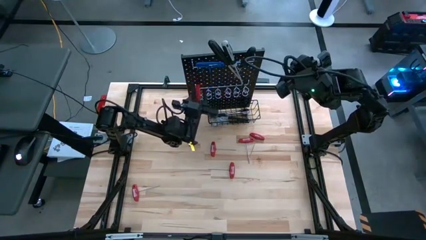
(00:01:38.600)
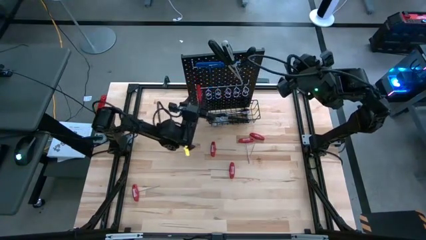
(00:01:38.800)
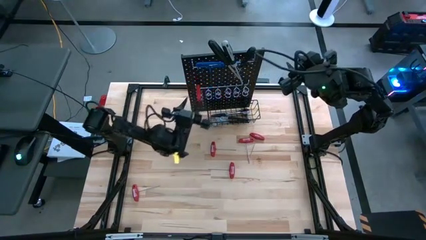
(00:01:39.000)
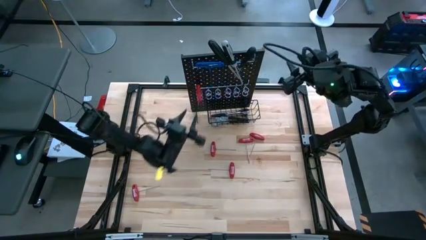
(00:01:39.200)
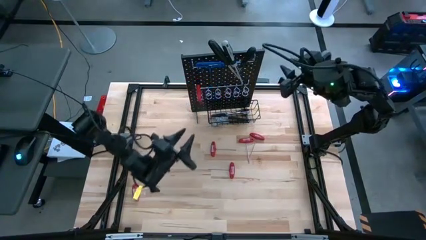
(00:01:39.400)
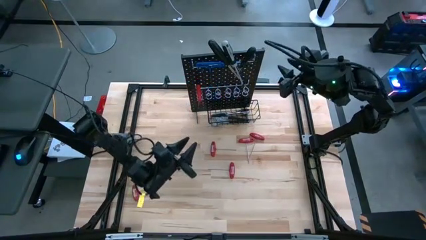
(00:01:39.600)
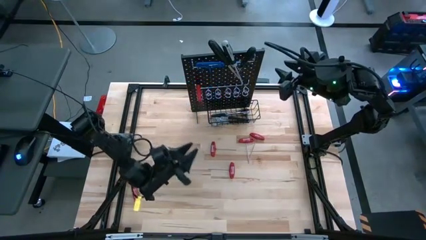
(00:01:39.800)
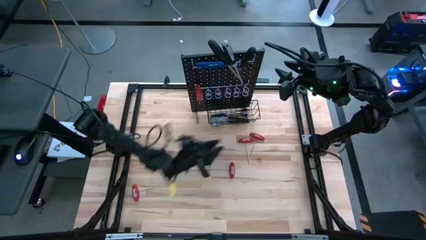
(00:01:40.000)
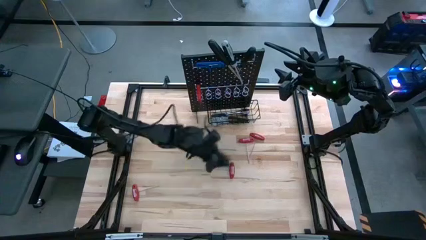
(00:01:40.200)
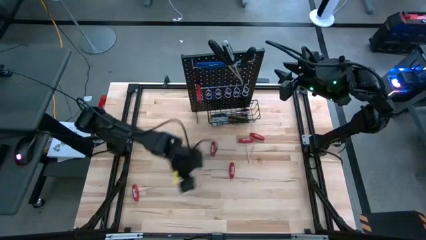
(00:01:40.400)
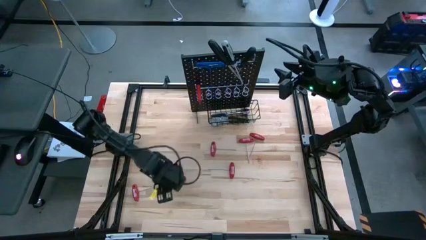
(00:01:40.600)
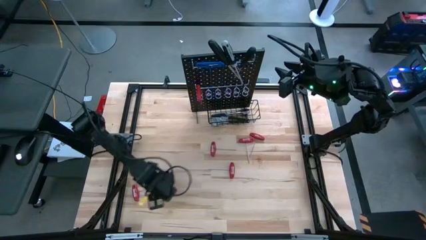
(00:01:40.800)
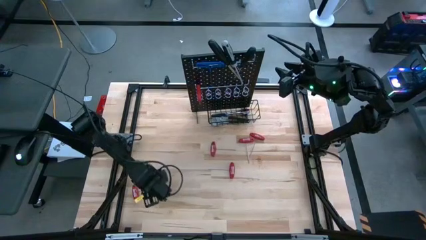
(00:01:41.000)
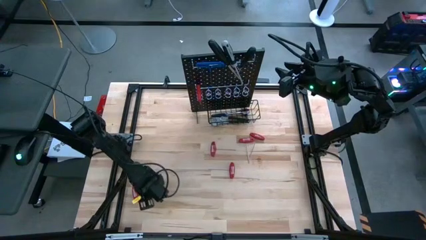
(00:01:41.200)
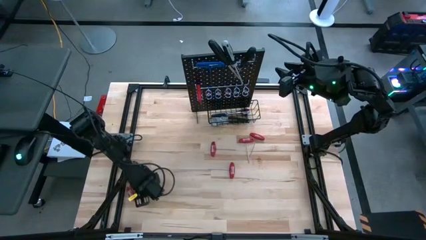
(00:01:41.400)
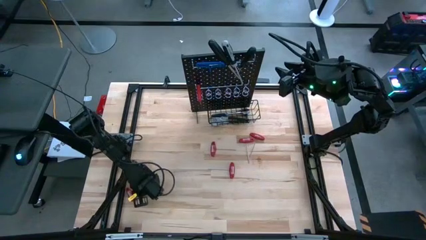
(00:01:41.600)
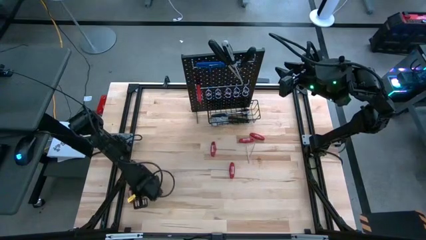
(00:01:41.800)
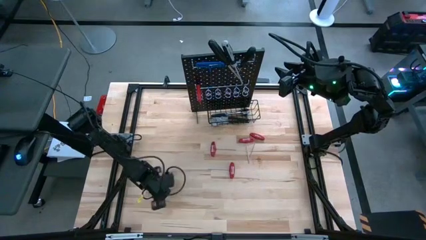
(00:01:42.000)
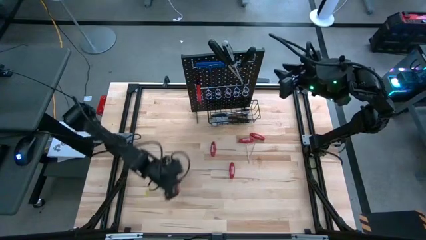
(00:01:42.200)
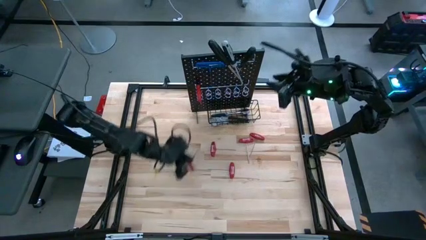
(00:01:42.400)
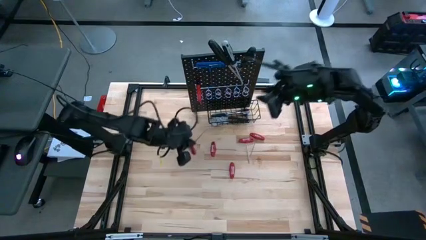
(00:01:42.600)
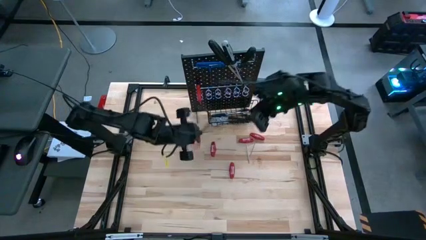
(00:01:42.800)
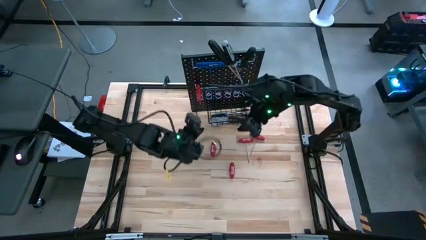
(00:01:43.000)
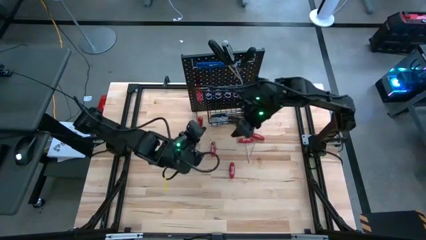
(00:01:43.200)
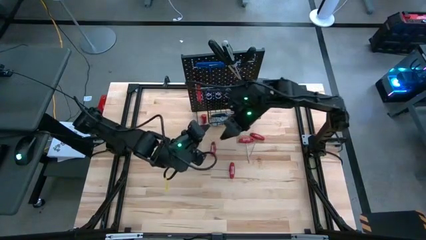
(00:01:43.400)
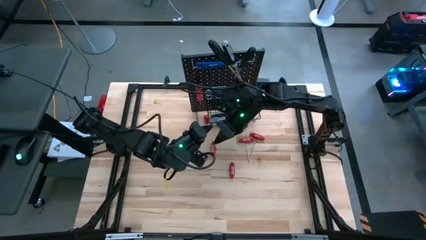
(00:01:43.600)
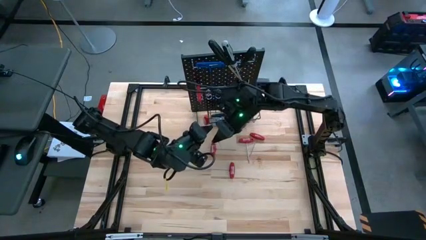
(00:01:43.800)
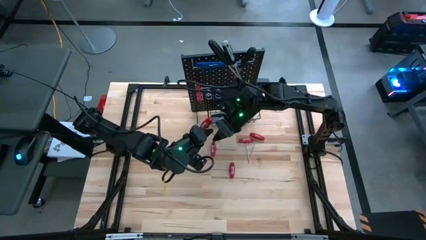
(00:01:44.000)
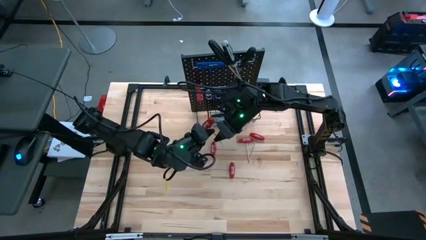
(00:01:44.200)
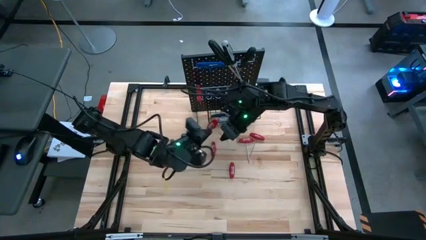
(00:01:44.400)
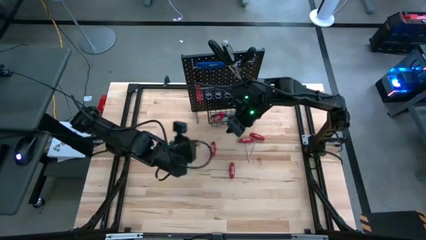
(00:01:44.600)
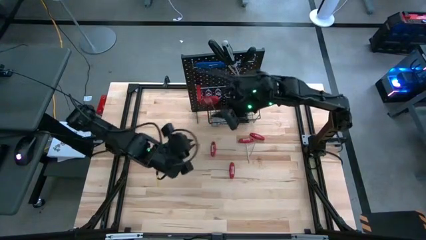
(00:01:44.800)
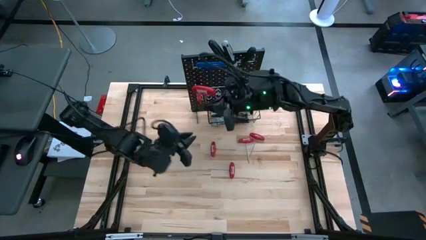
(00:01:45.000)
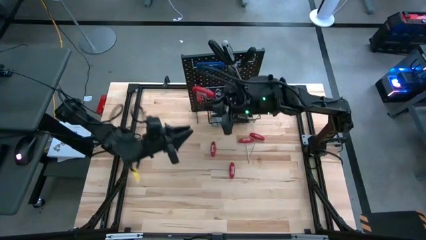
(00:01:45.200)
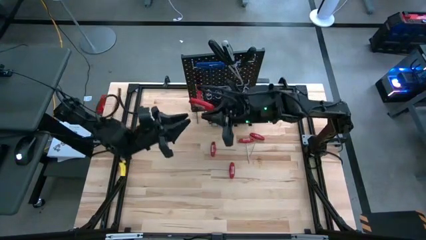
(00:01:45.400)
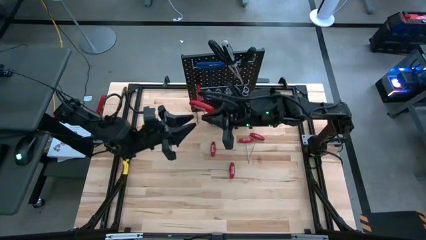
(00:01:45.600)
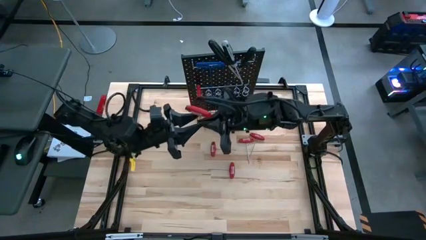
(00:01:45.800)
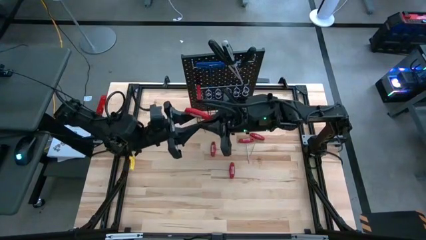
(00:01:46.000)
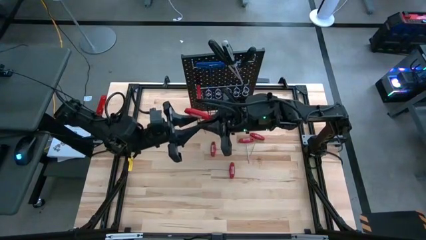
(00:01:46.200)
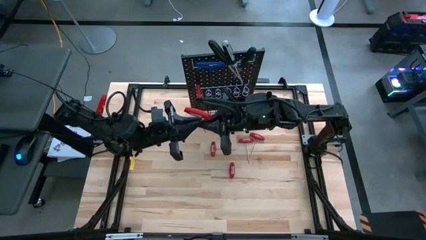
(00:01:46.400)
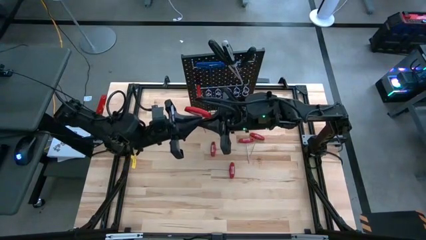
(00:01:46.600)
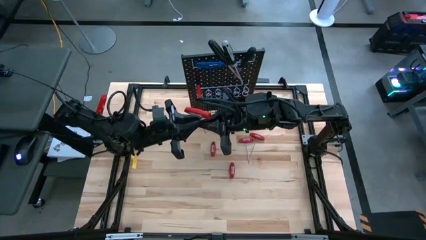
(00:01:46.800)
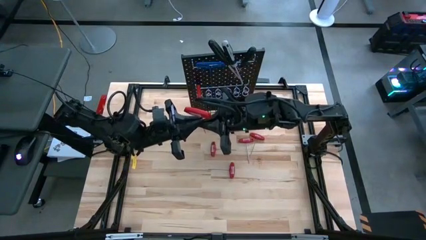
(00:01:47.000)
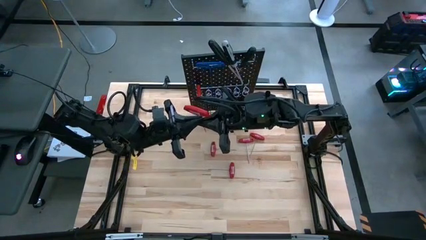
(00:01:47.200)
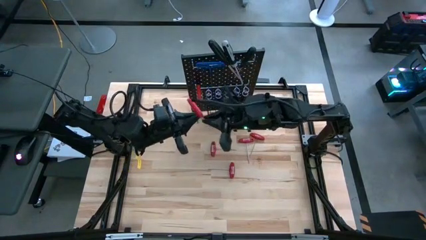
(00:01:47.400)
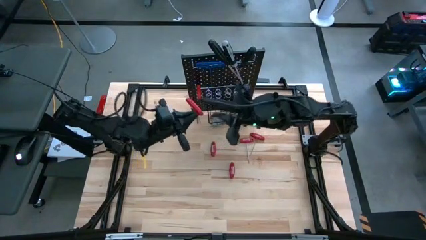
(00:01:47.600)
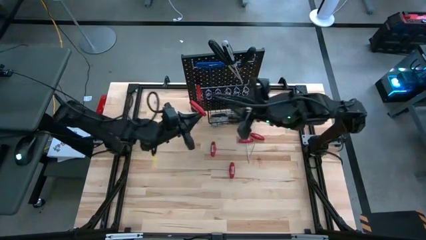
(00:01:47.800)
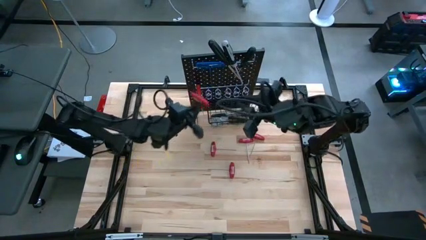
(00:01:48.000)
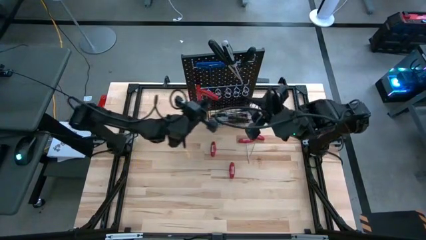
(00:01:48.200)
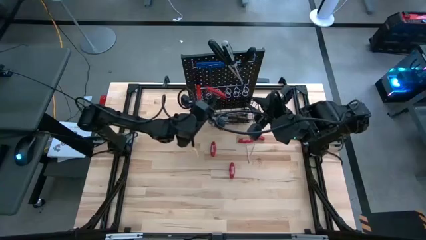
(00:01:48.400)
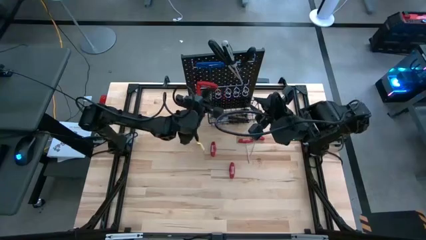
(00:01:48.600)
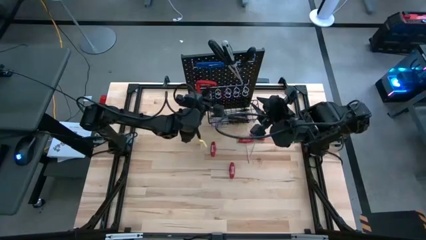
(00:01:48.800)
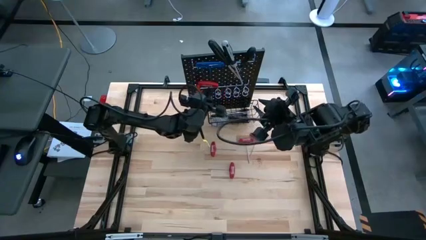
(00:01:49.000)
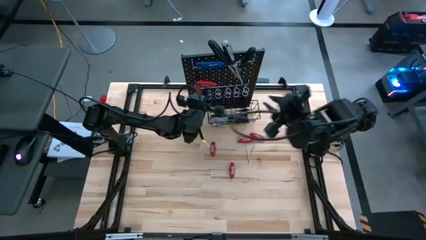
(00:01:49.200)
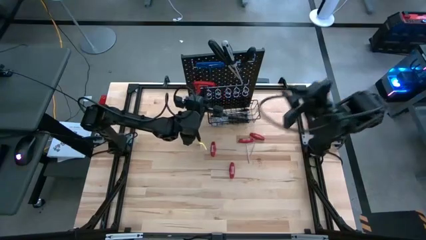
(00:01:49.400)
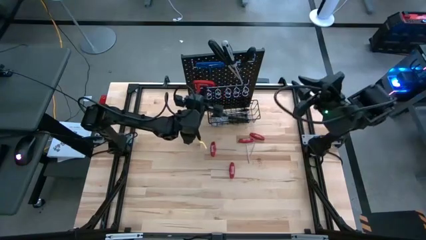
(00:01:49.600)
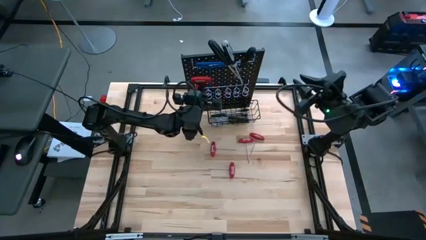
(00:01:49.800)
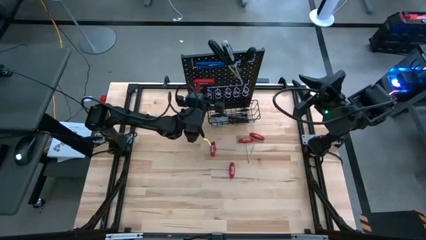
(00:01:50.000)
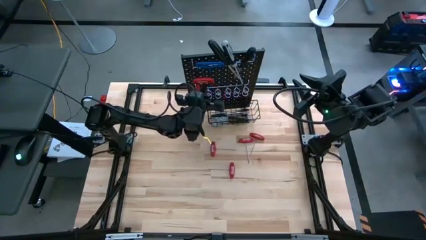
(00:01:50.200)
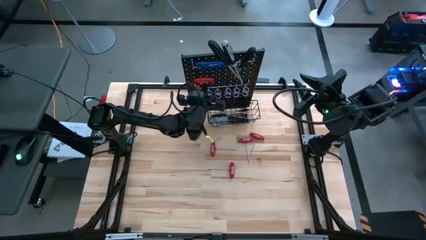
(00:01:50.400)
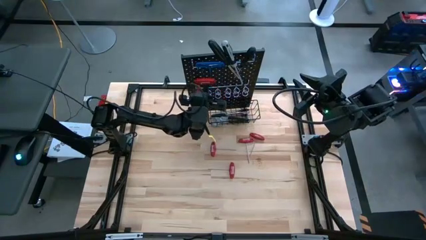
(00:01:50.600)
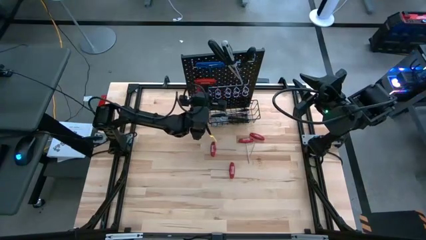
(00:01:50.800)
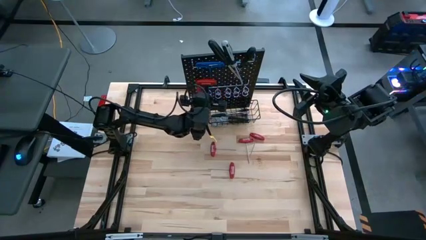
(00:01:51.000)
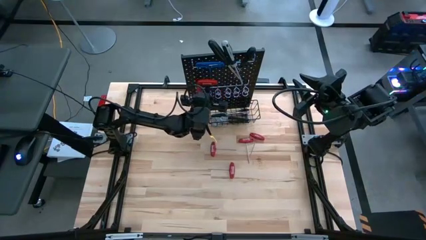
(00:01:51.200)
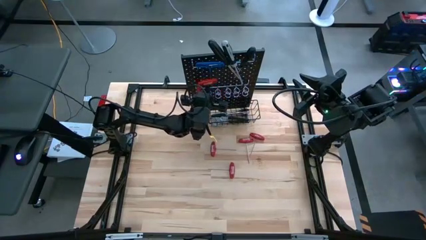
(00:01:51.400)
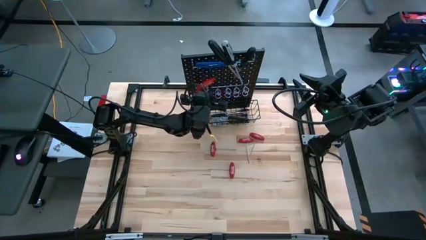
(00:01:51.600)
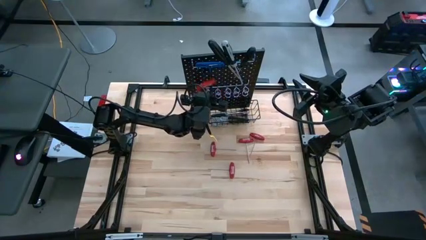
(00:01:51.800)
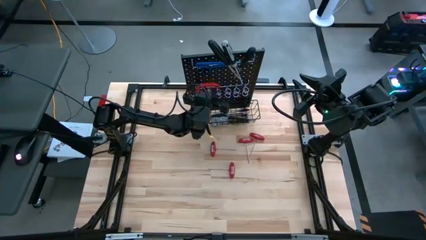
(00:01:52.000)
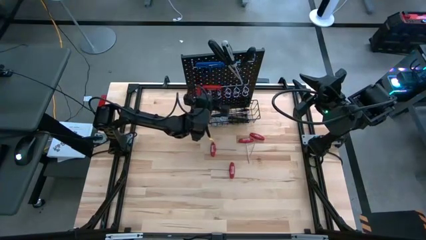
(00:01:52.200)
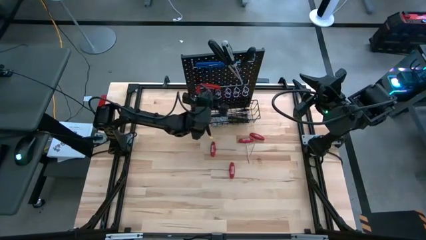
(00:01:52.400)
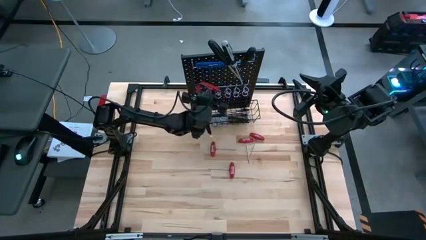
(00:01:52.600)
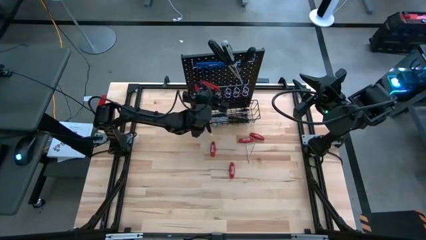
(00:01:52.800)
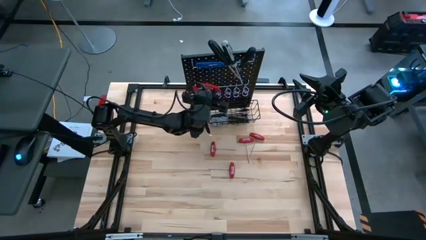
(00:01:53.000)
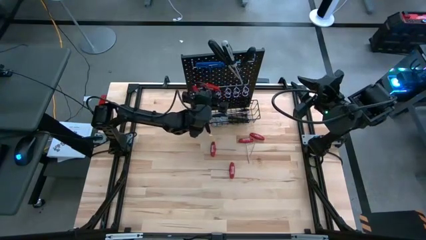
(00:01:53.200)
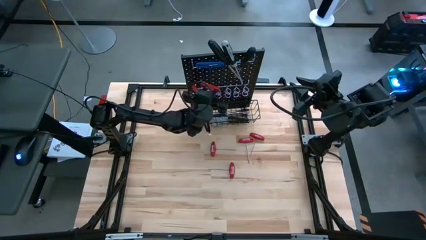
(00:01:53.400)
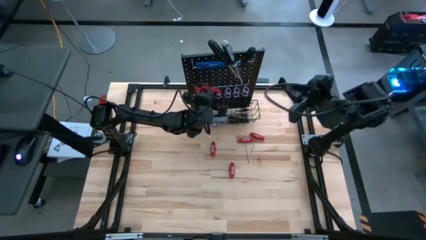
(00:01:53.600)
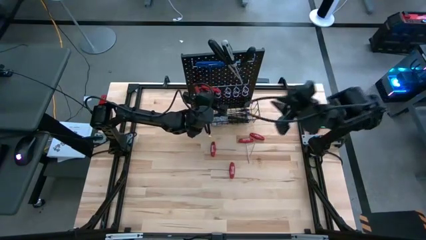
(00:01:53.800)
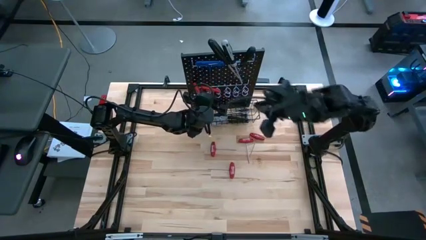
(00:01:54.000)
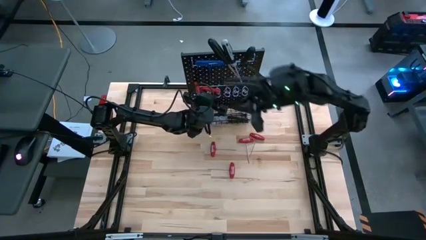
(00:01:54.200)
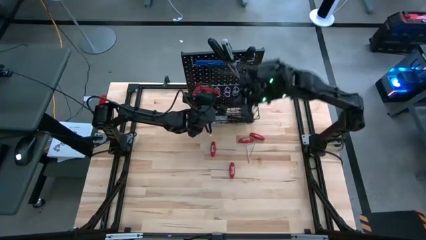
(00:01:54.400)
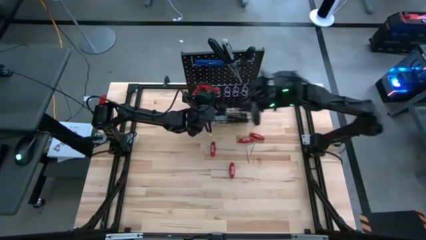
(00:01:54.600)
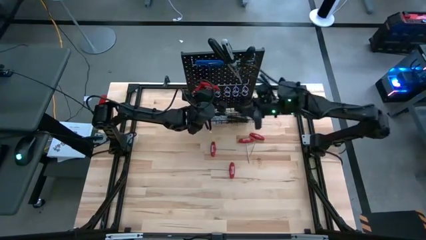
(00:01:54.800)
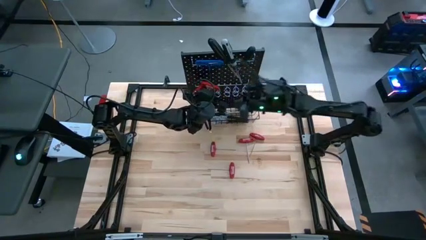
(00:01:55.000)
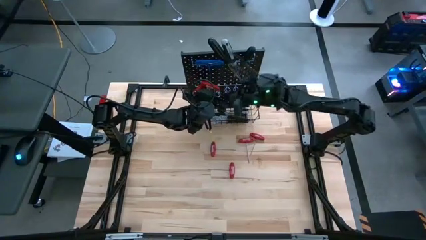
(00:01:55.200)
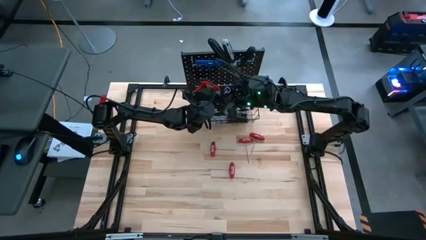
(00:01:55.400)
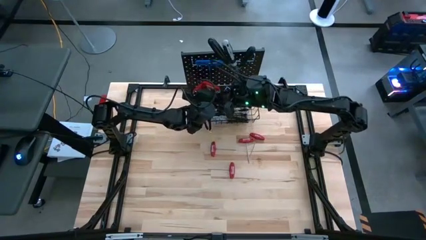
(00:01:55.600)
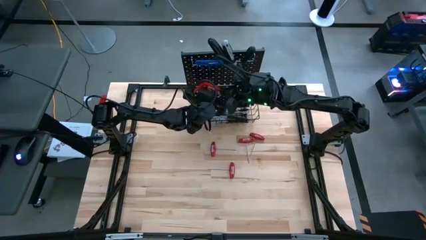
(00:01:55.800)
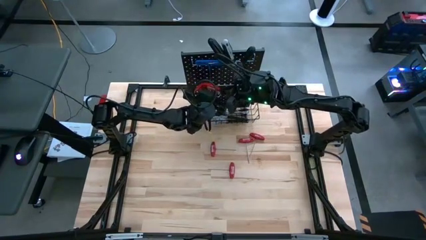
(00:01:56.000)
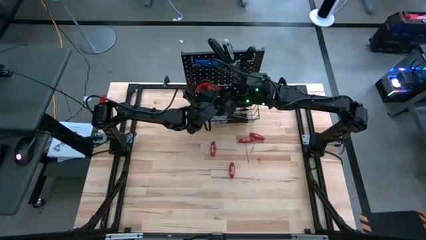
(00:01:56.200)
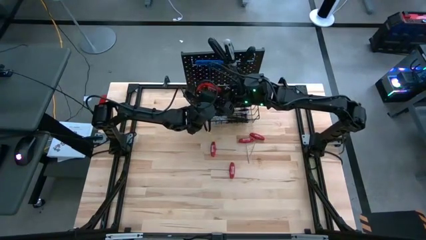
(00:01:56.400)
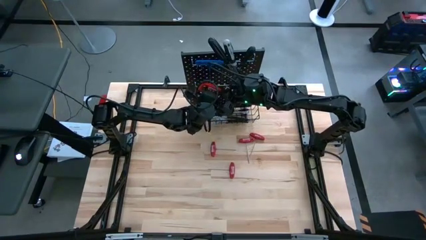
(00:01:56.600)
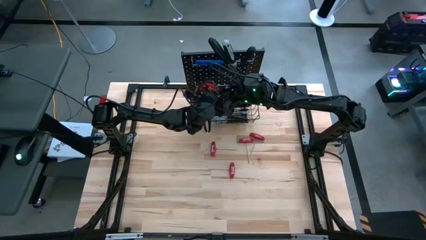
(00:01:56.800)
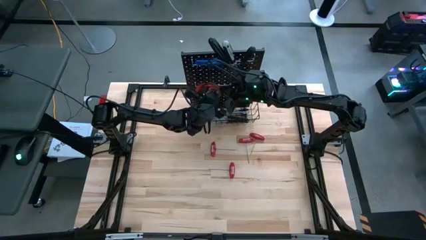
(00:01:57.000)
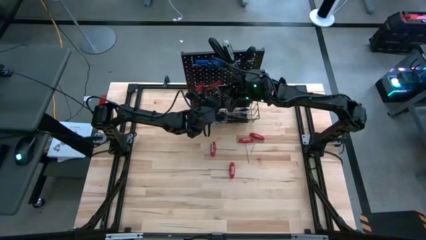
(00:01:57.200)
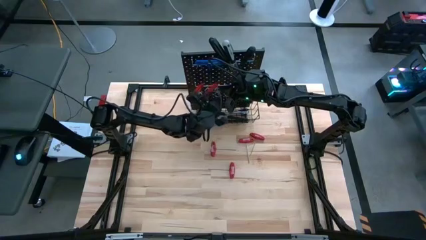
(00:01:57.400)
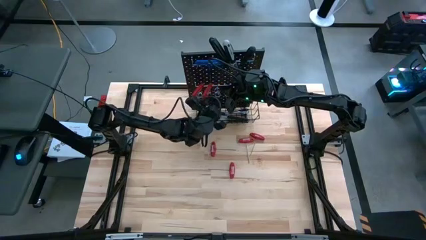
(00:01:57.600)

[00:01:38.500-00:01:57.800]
Task: Hang tools onto peg board
Hang the red allen wrench on the pegboard
